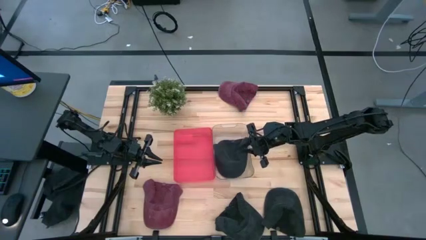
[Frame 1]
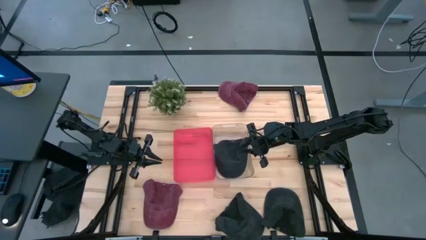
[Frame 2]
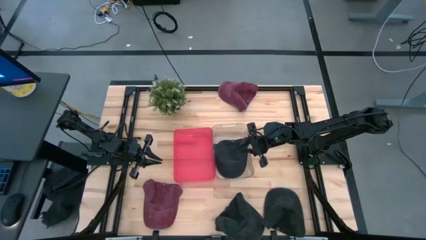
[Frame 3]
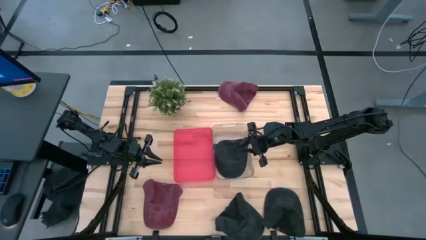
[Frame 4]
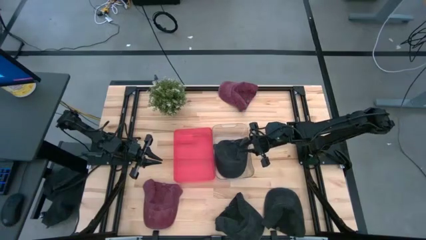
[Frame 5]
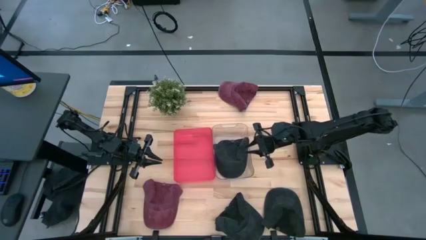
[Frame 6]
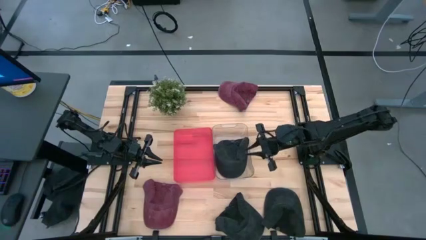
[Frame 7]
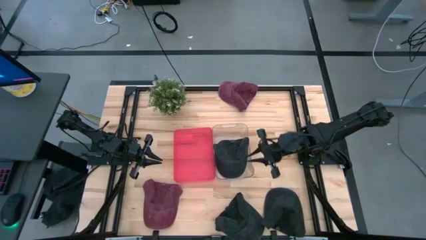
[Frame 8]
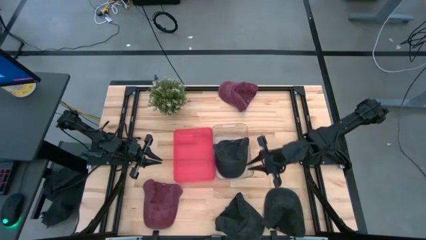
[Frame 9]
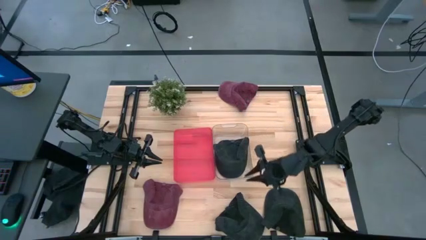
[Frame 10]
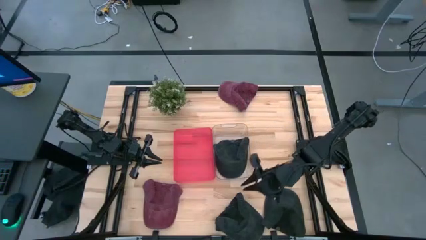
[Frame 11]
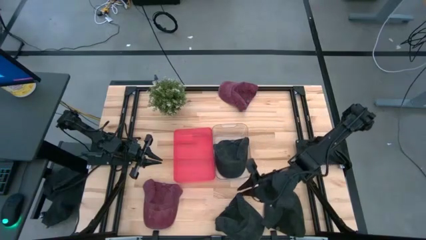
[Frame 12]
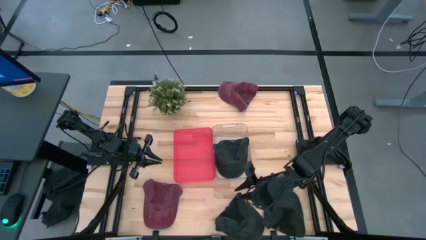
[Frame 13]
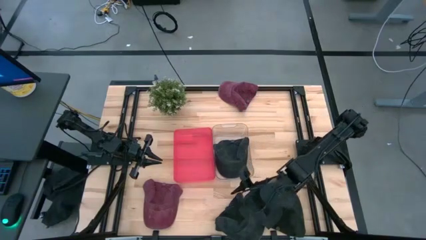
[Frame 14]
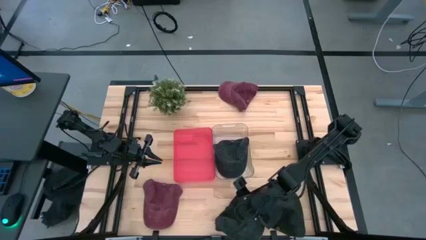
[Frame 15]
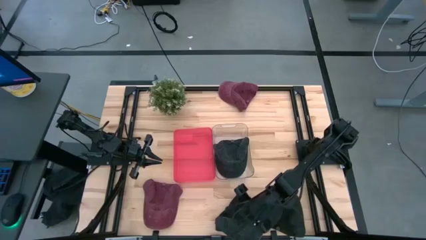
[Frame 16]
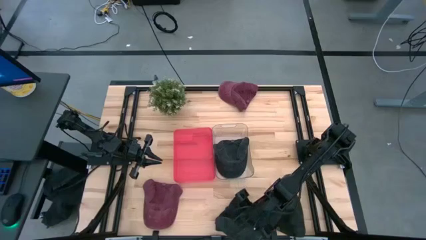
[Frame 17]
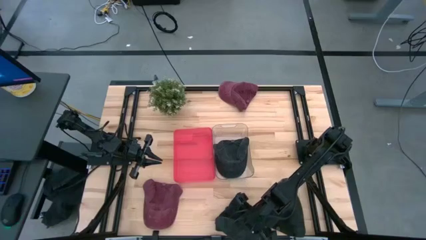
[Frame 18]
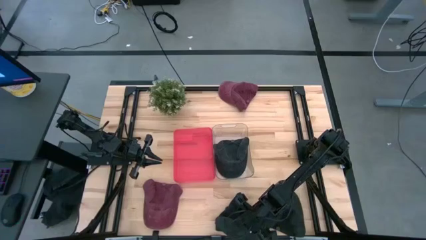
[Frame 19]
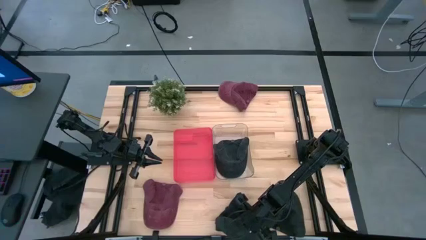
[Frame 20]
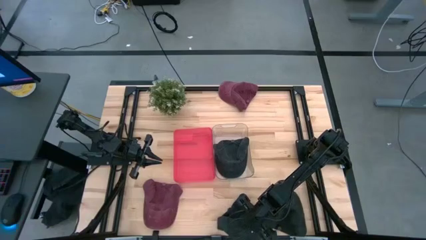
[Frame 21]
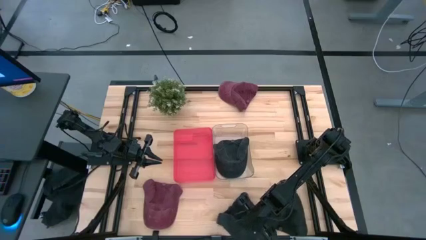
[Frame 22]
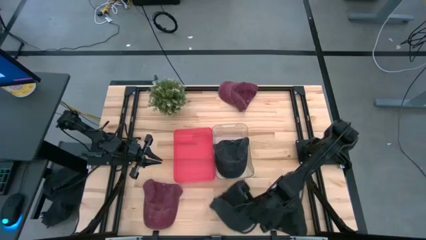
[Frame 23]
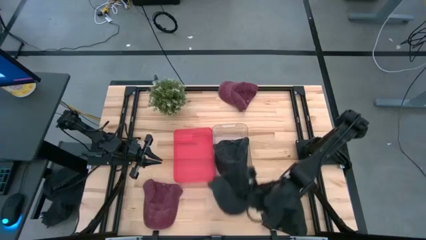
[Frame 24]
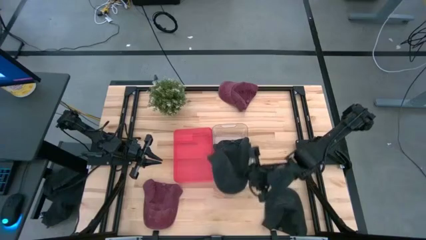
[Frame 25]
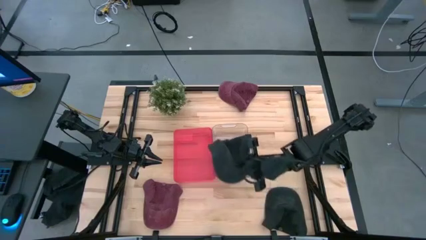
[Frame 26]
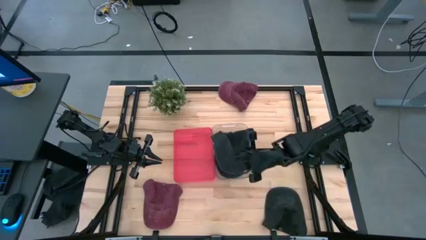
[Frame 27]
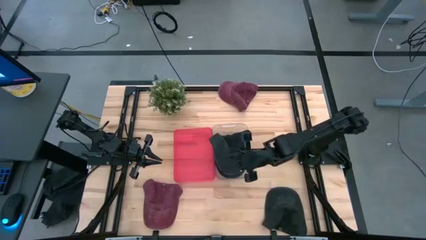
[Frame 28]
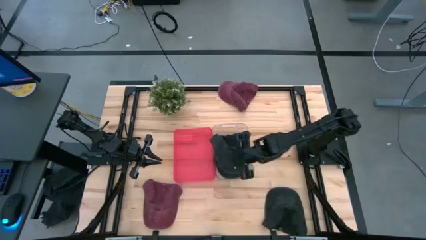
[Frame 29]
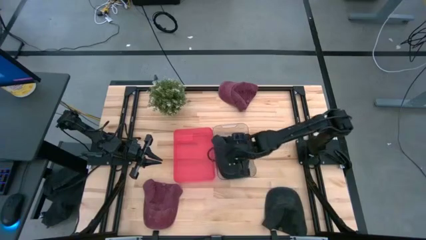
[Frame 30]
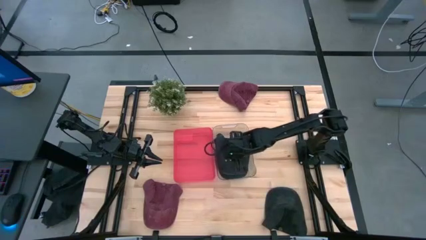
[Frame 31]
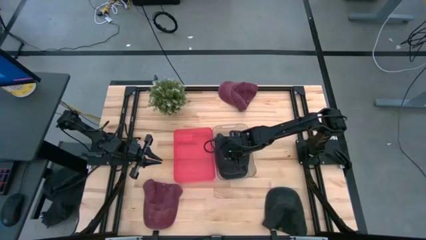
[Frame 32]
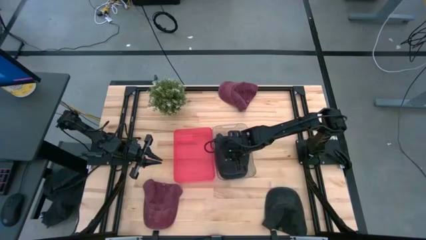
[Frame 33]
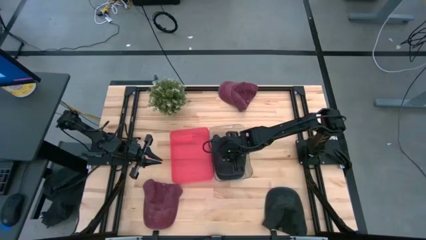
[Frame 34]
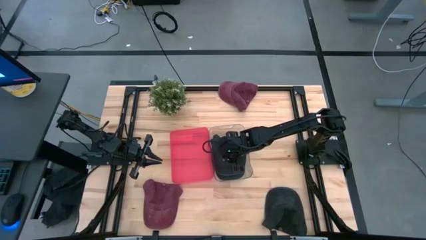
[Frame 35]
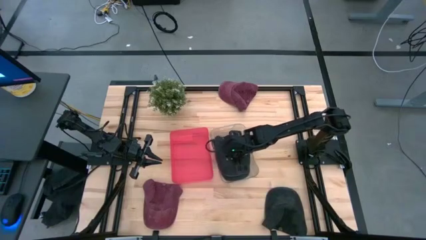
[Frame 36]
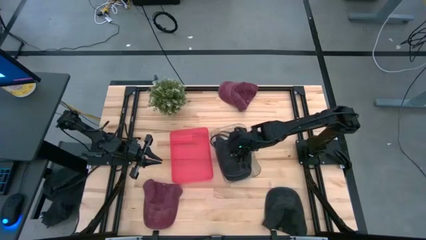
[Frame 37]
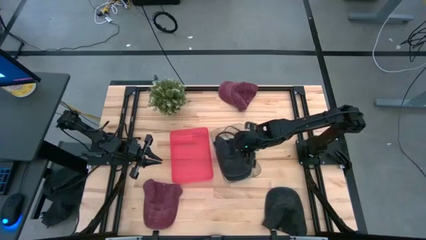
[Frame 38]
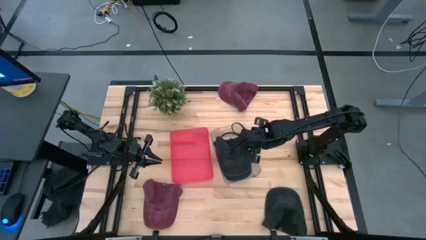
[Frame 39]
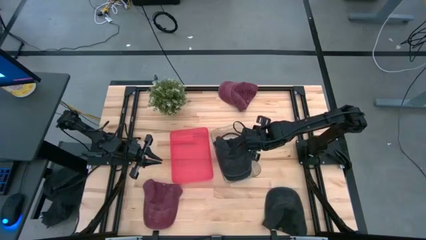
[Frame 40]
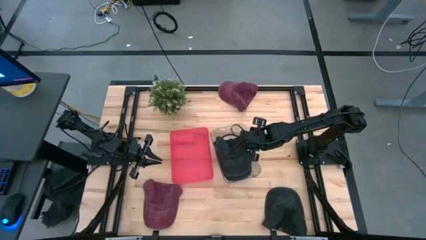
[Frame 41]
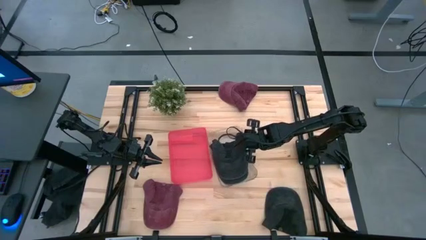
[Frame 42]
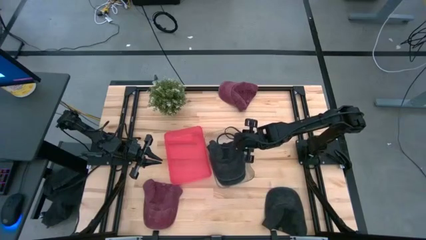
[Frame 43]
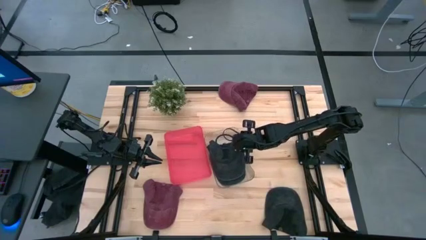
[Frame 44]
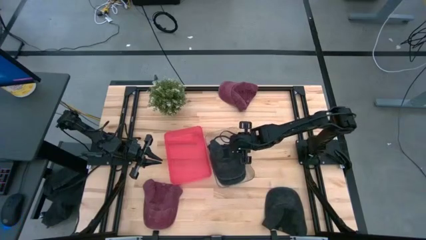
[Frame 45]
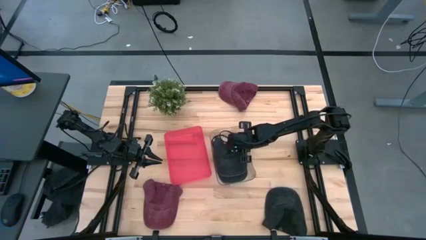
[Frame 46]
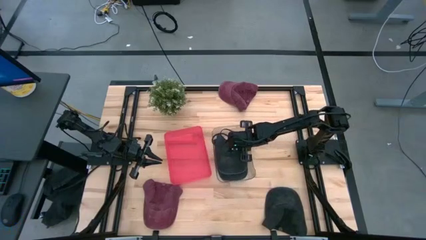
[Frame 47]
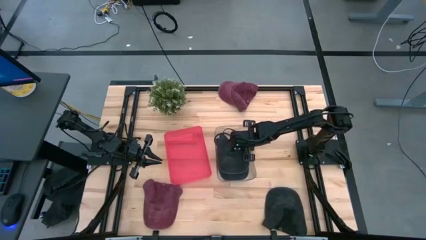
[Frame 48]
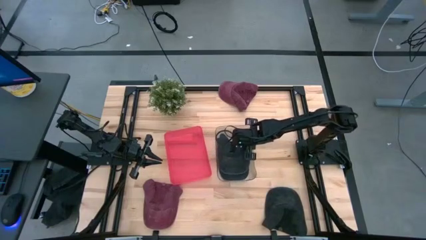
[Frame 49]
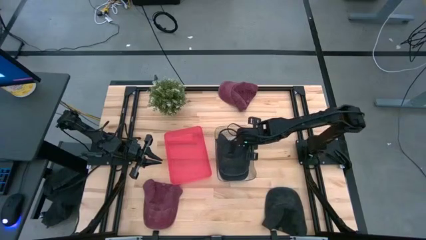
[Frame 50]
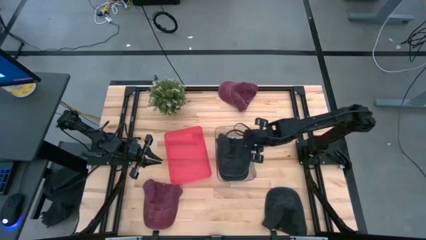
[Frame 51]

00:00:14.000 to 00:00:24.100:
Task: Pick & Place hat
Put the left black cap into the transparent bin

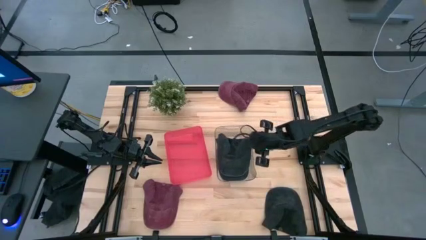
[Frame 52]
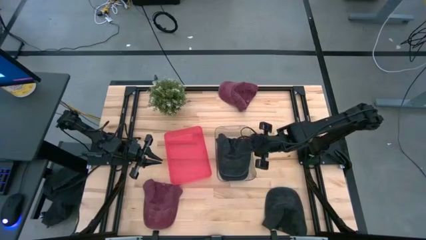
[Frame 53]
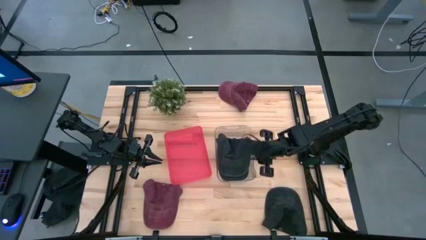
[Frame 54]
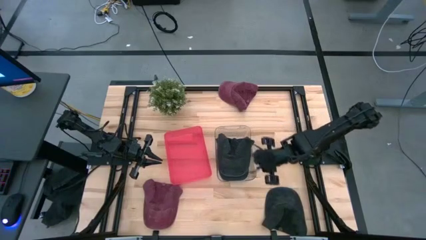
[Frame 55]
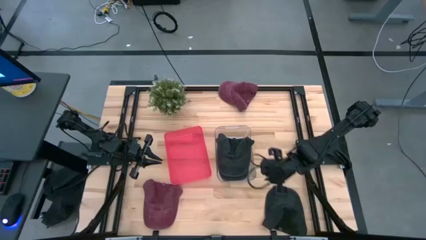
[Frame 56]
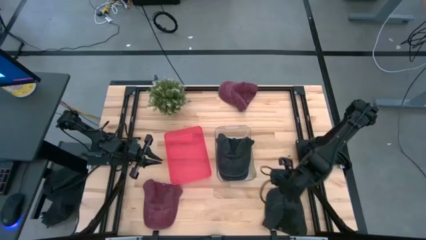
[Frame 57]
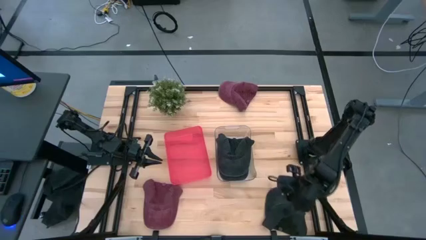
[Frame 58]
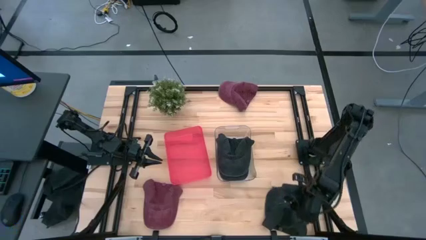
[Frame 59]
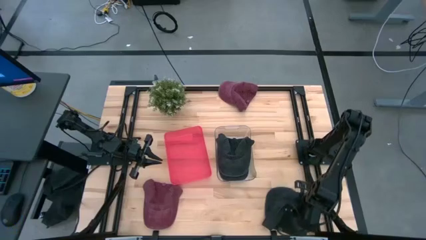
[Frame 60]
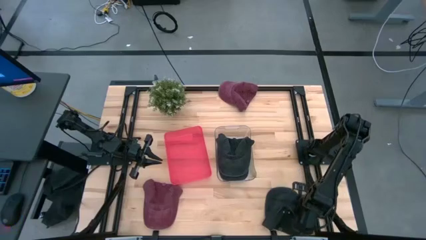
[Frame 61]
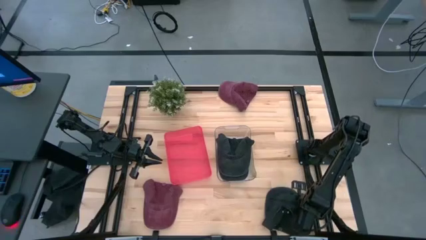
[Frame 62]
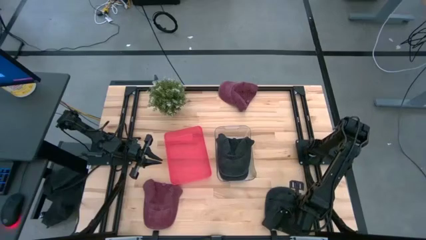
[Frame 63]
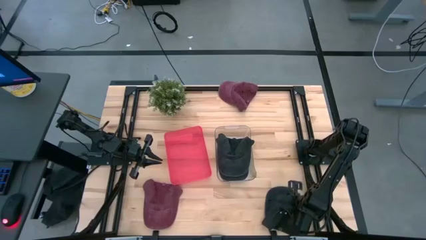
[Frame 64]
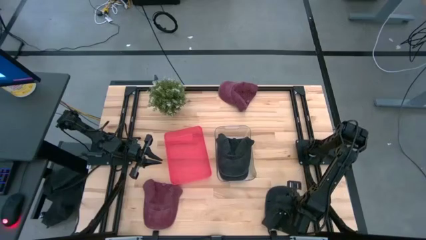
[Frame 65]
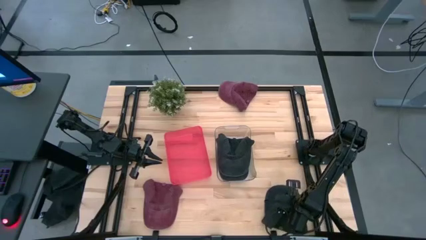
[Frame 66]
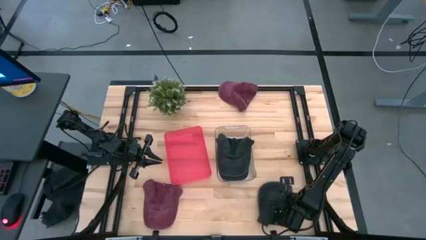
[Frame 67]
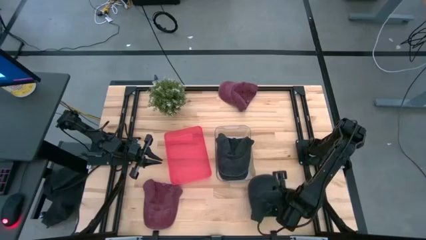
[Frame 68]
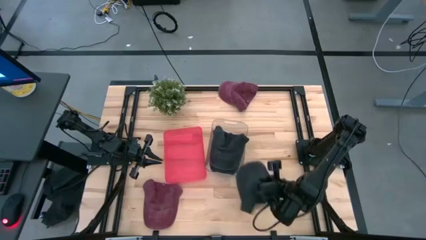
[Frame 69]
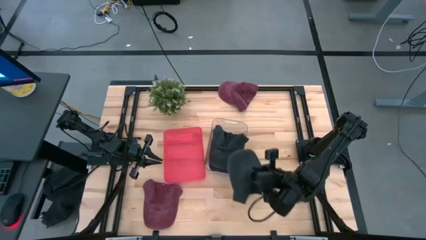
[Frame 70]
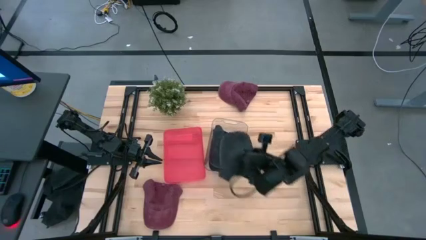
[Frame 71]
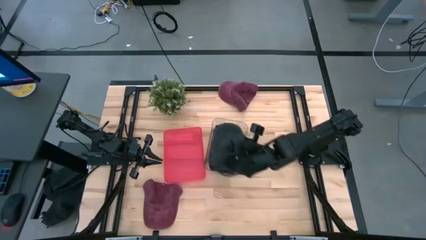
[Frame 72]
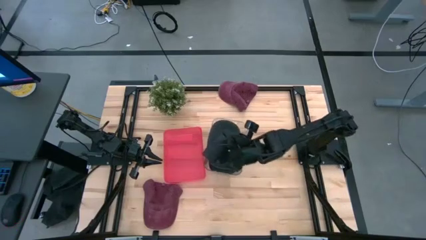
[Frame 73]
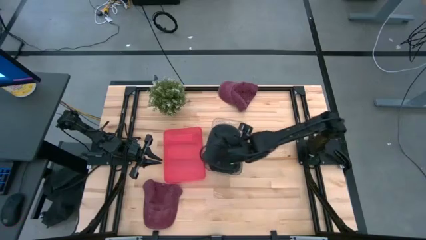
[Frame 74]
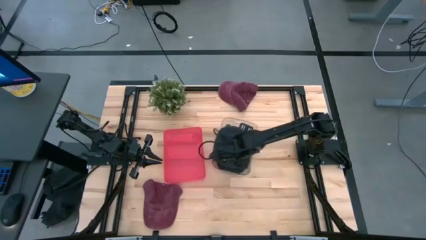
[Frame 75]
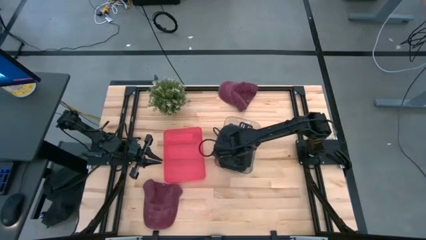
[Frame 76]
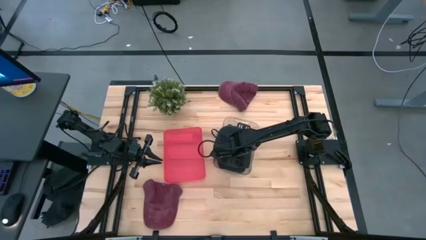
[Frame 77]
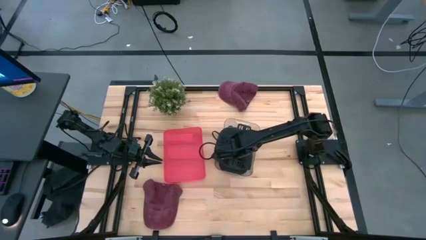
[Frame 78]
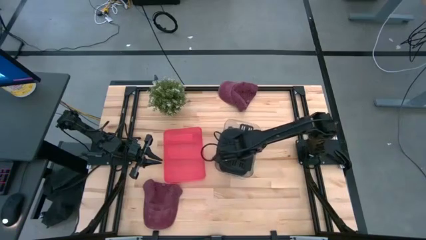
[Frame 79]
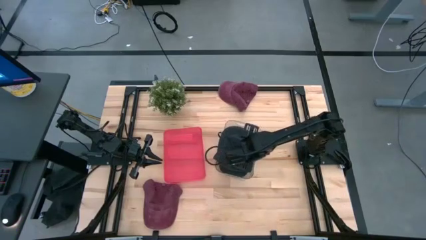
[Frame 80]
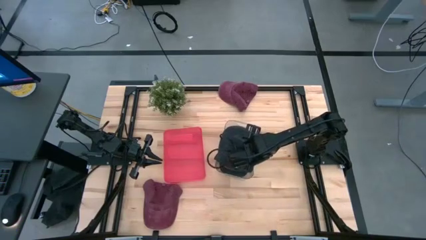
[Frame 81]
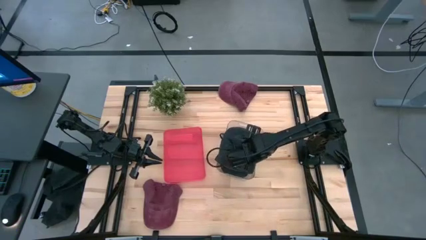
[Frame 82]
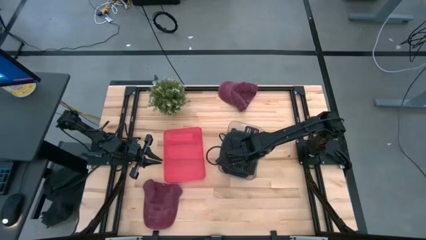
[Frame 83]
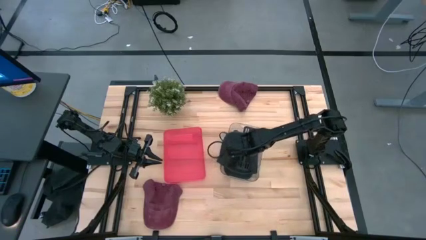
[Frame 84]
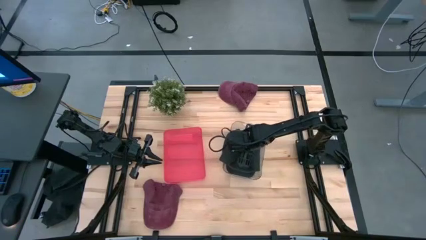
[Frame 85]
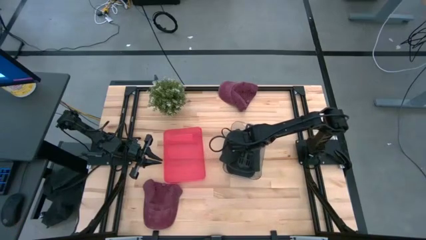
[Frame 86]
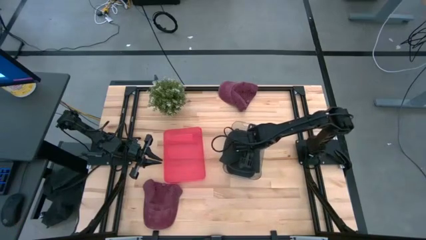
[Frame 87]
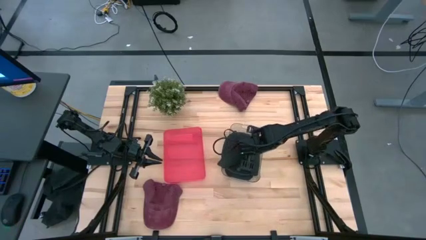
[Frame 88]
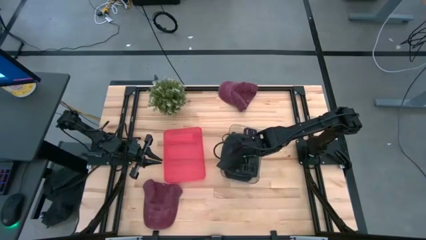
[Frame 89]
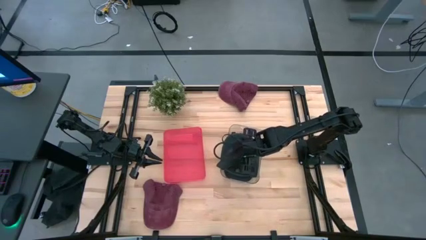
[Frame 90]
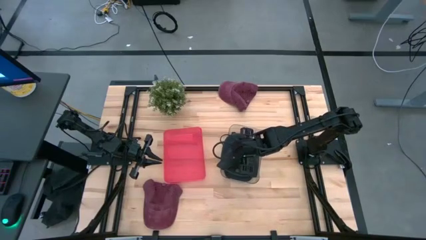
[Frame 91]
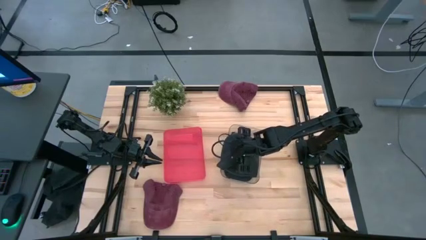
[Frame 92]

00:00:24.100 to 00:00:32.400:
Put the black cap into the transparent bin
